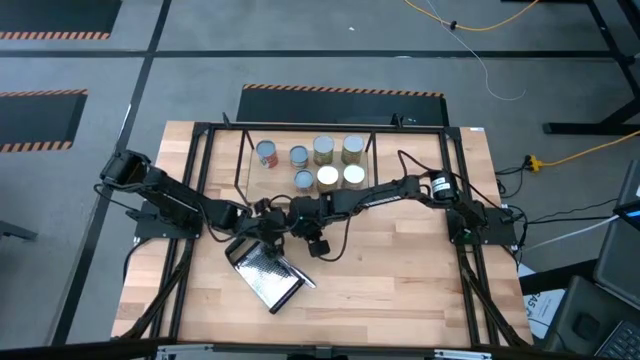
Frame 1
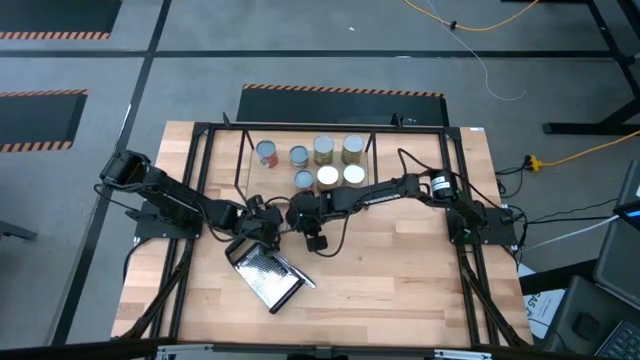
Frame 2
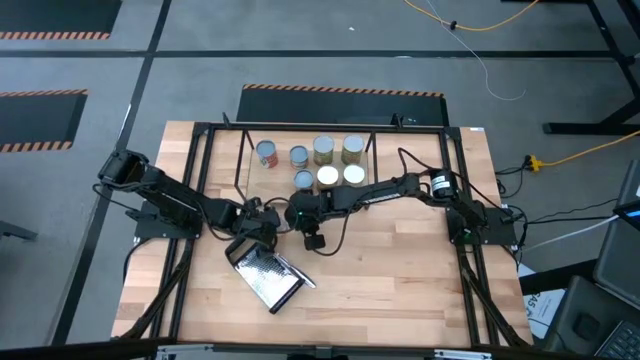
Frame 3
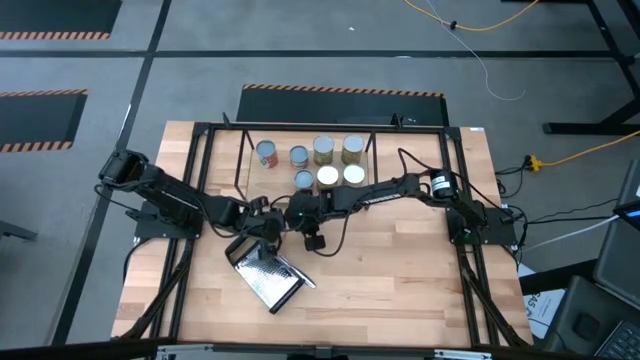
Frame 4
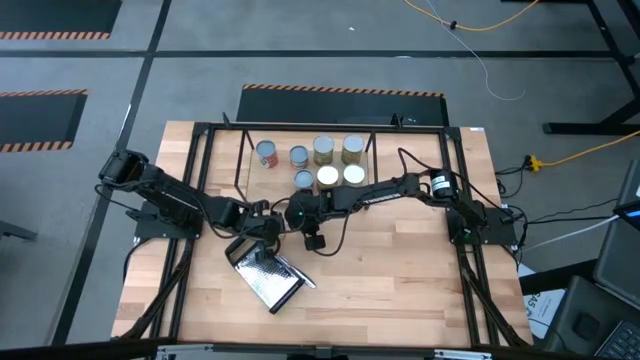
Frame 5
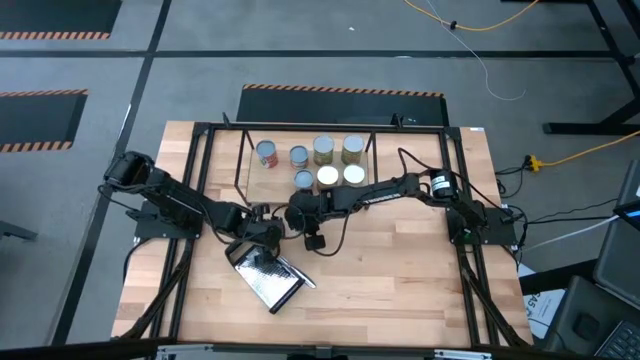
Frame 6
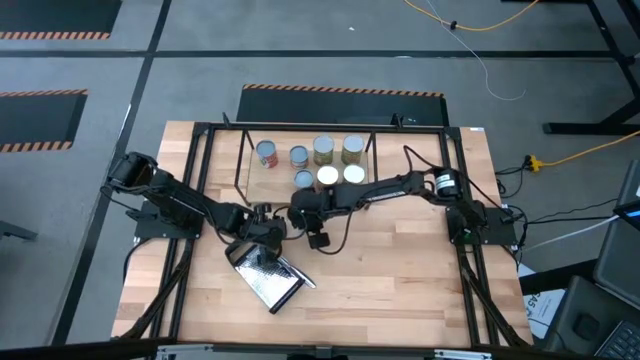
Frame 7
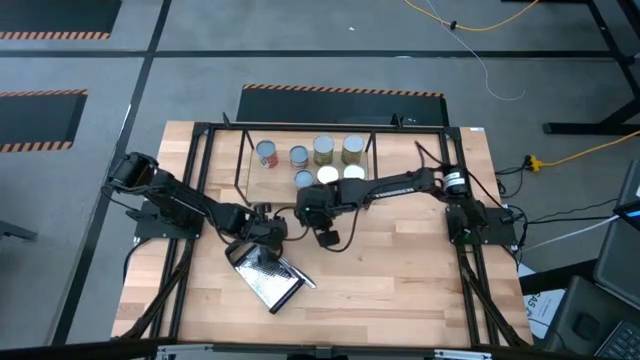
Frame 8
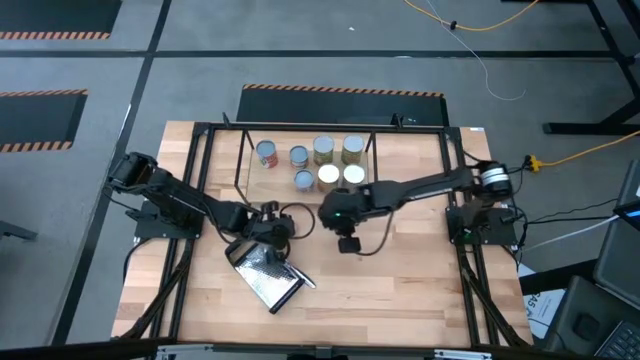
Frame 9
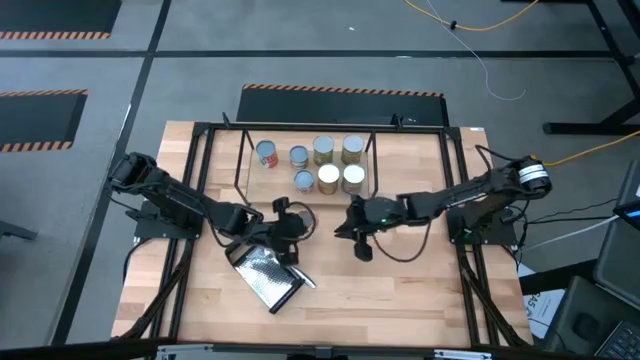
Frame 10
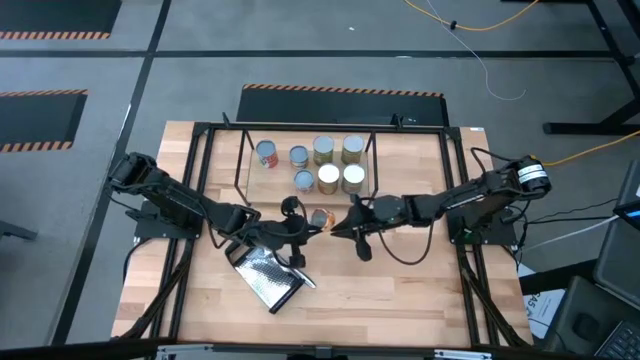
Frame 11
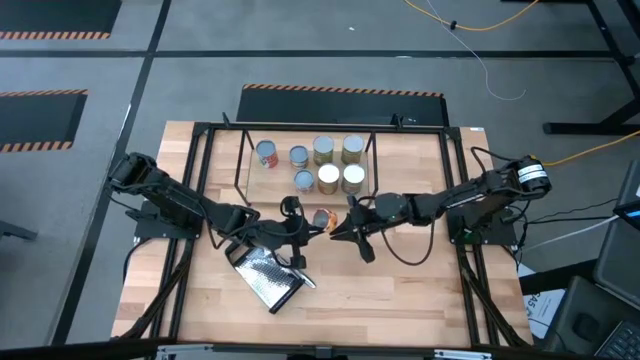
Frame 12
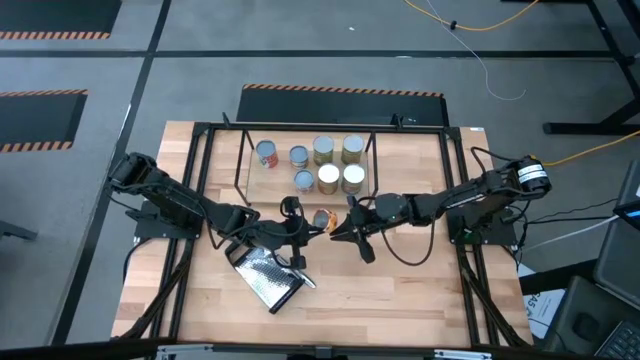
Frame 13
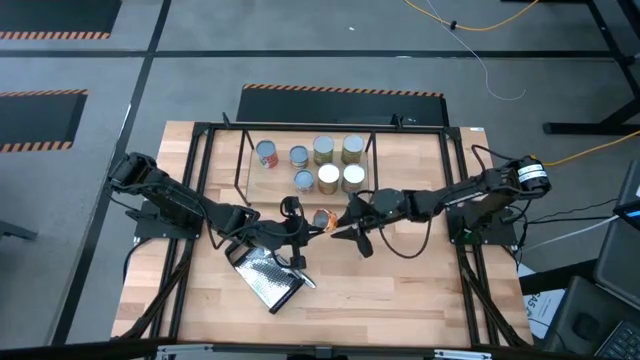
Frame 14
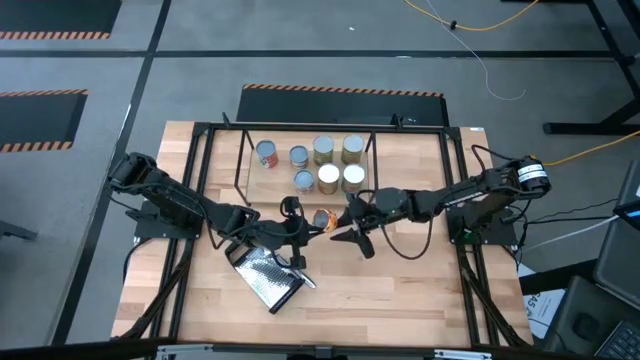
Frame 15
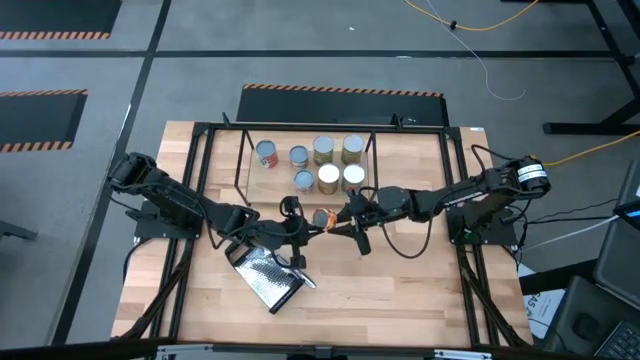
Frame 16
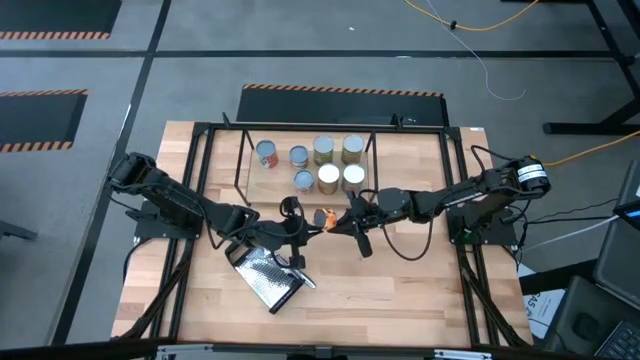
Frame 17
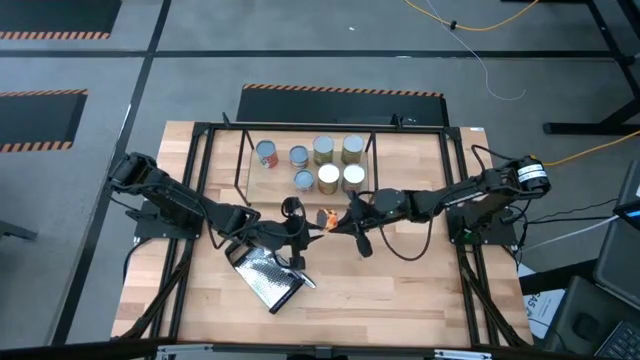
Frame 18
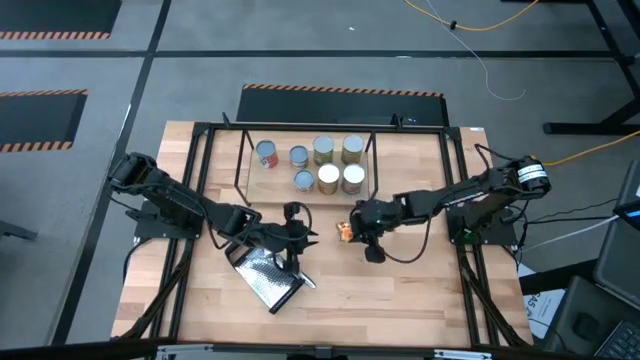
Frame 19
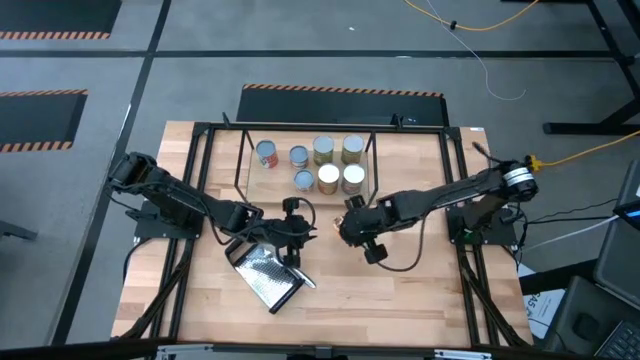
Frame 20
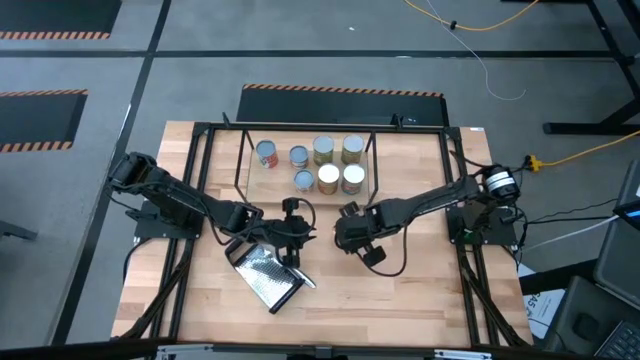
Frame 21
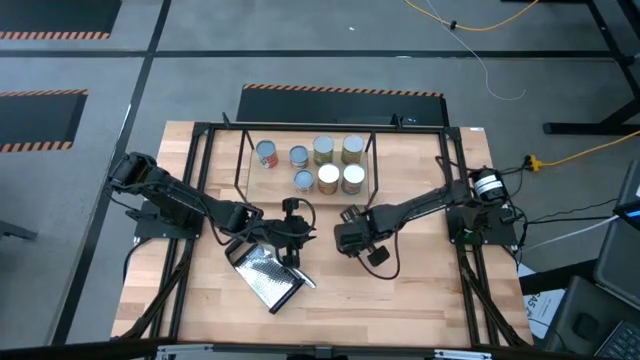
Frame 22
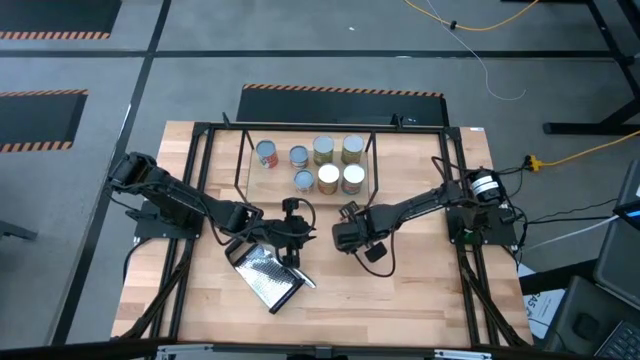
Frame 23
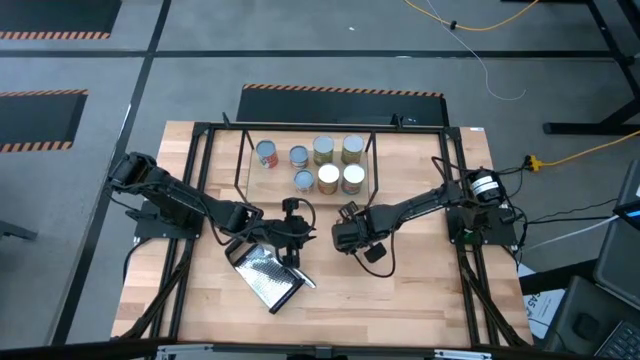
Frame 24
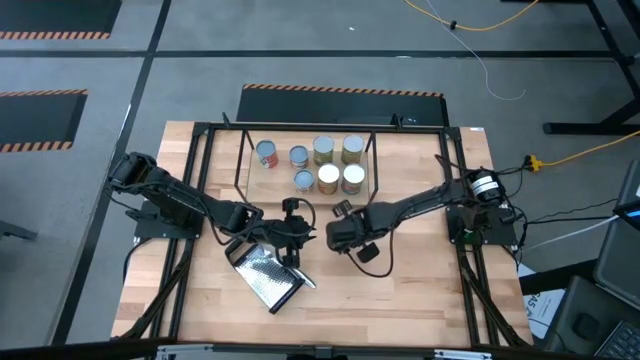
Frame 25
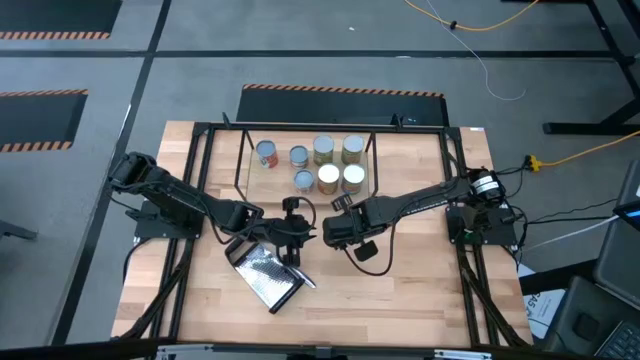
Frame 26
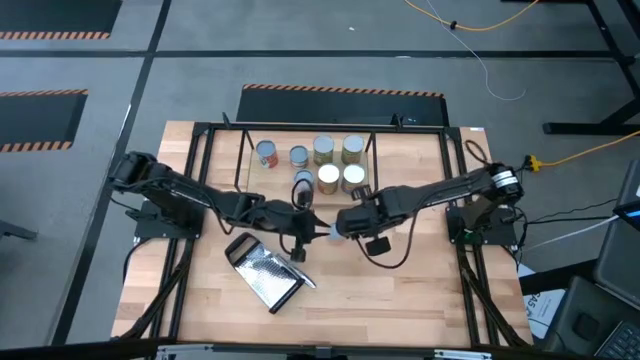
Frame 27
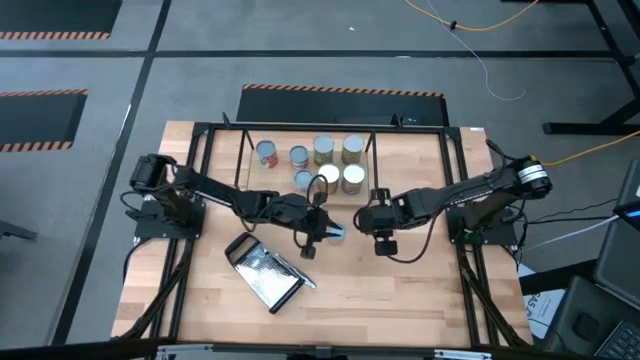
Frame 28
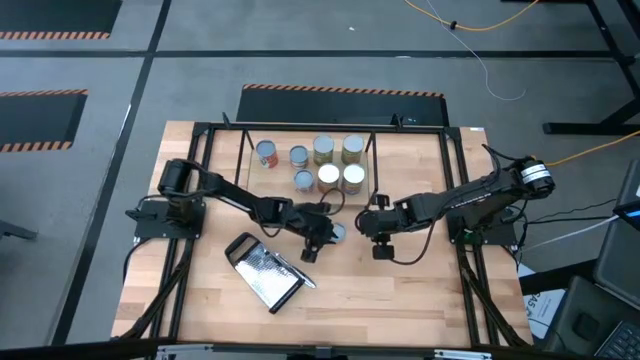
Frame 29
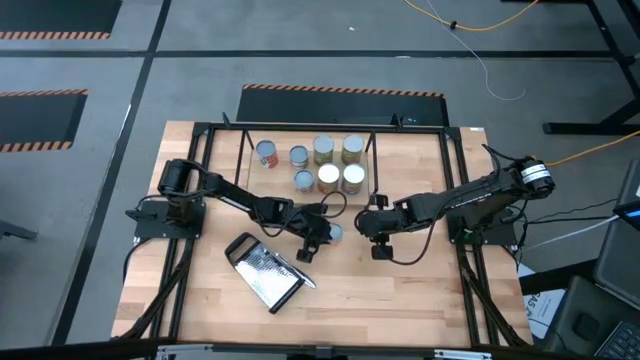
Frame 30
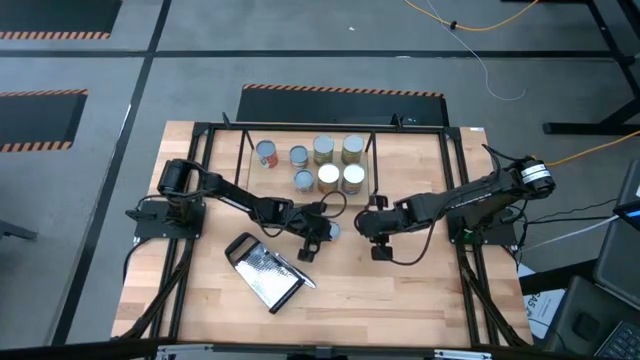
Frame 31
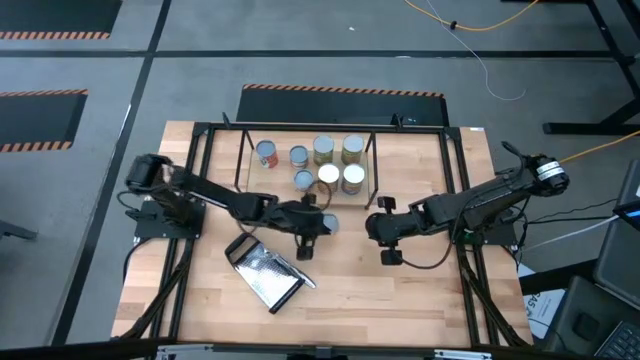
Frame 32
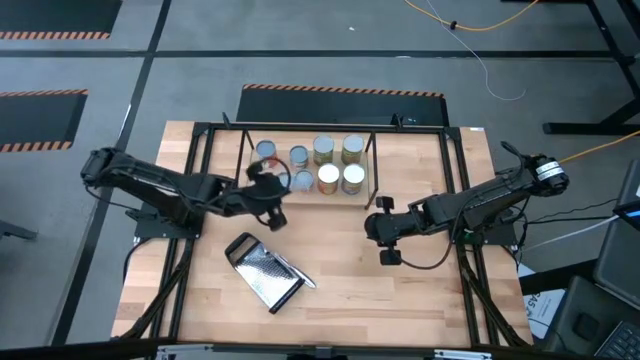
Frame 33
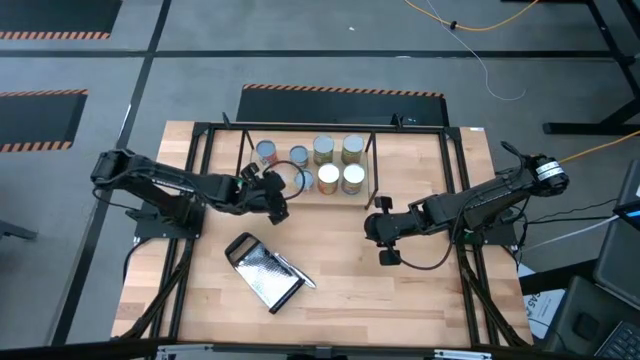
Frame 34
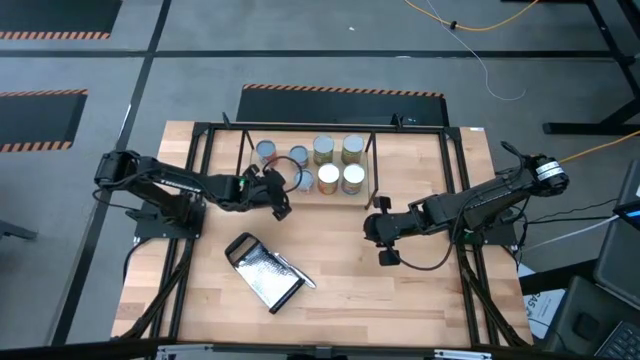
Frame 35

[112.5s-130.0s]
Task: Pick and place cans onto a shelf
Put the canned pineapple rings on the shelf

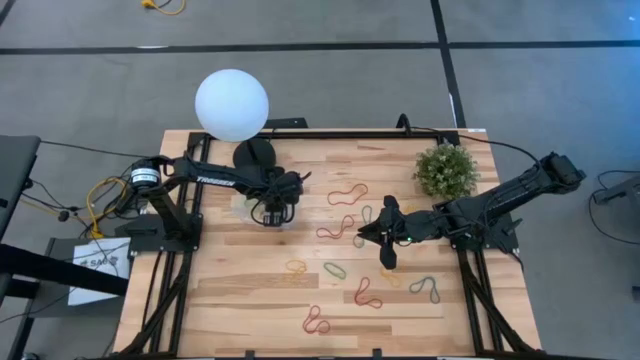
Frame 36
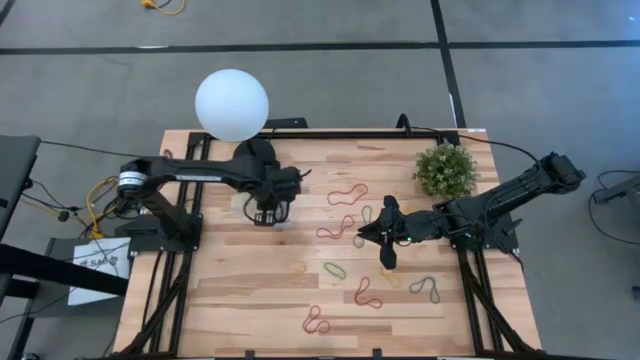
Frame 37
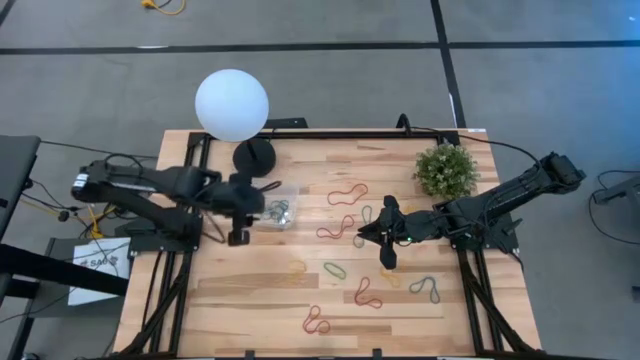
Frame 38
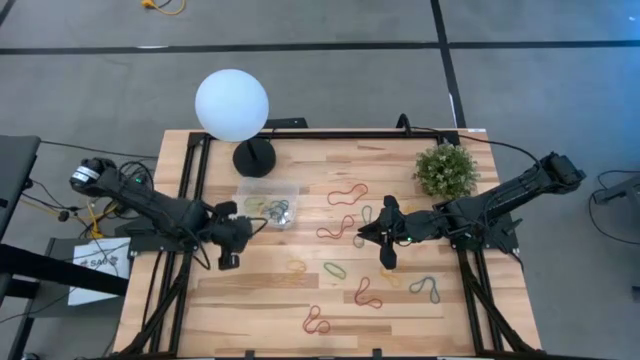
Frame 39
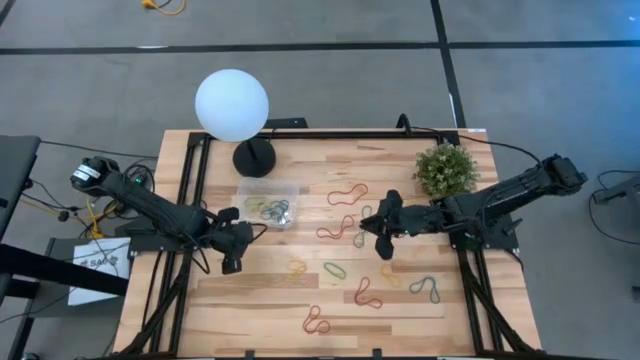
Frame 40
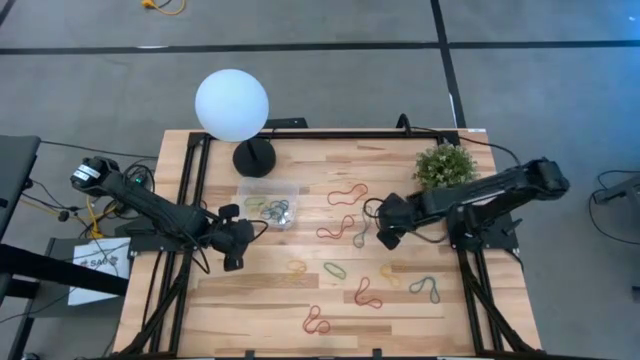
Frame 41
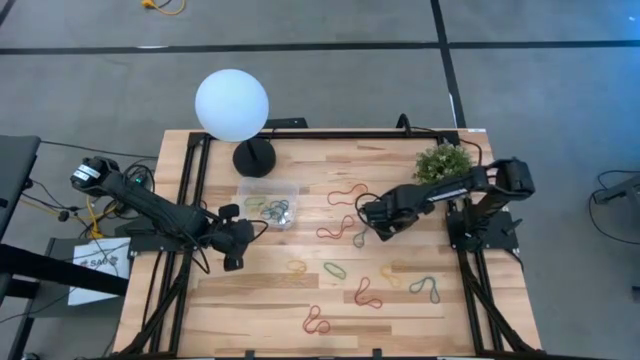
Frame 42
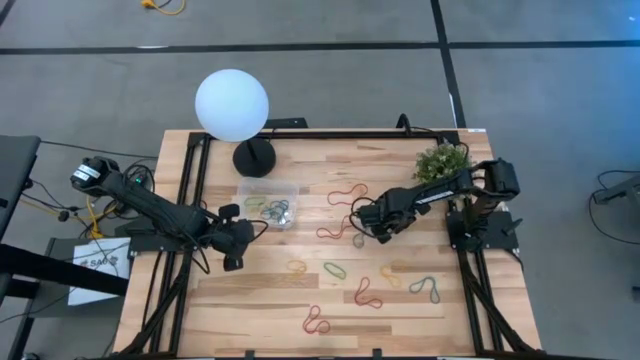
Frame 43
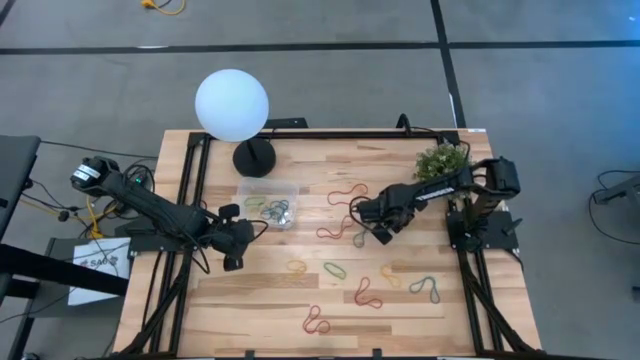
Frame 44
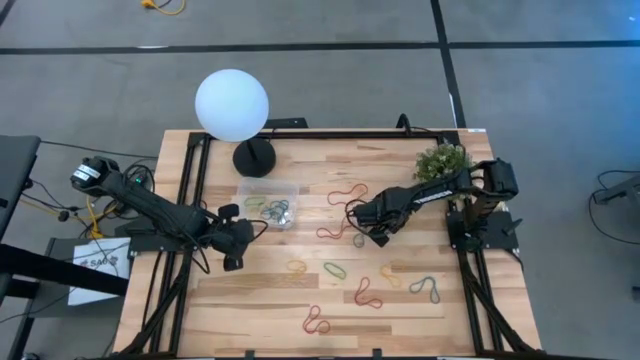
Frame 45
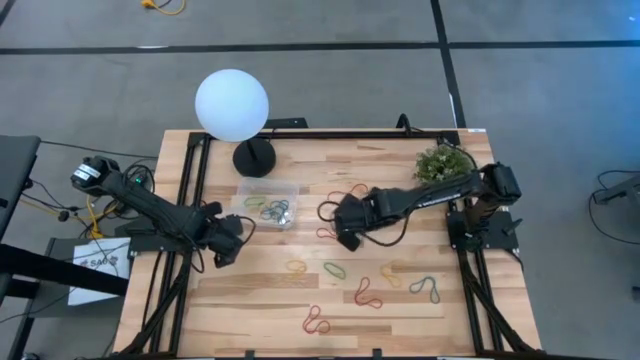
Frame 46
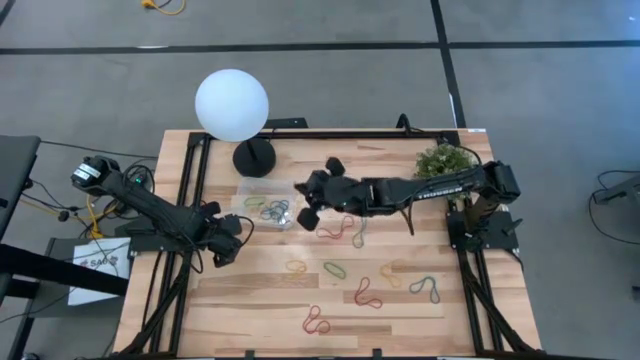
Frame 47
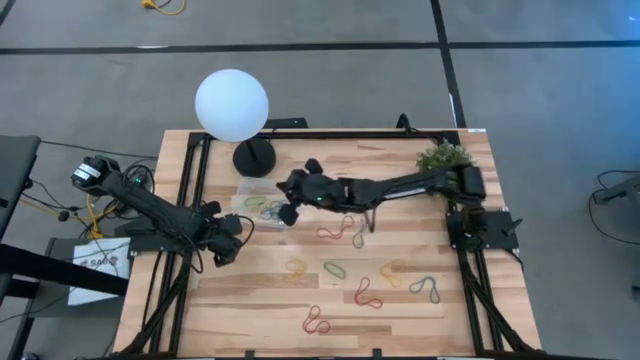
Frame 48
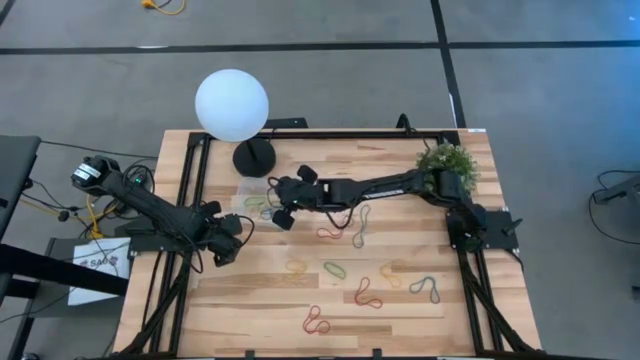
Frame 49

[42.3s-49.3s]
Task: Pick and place rubber bands into bin
Put the yellow rubber band into the transparent container
